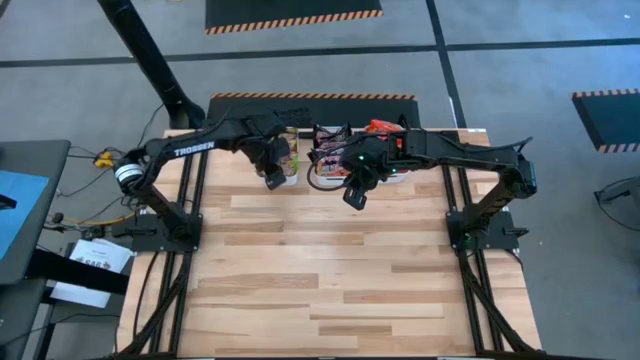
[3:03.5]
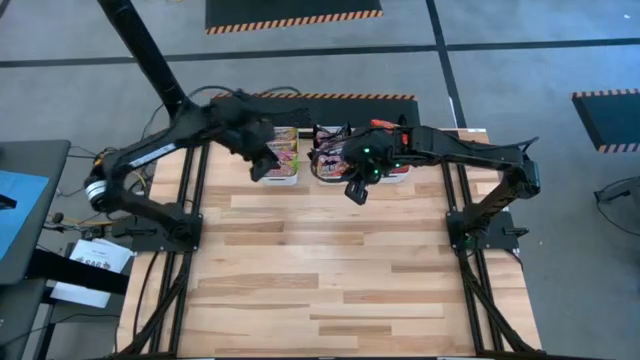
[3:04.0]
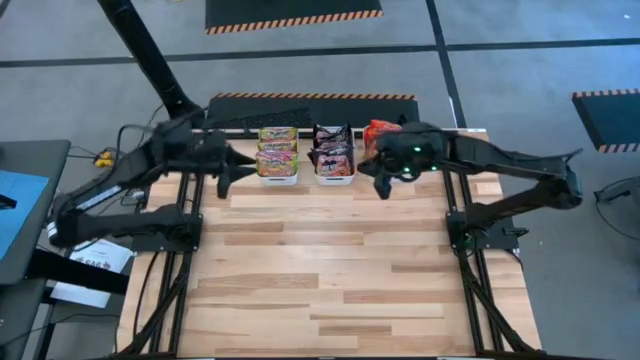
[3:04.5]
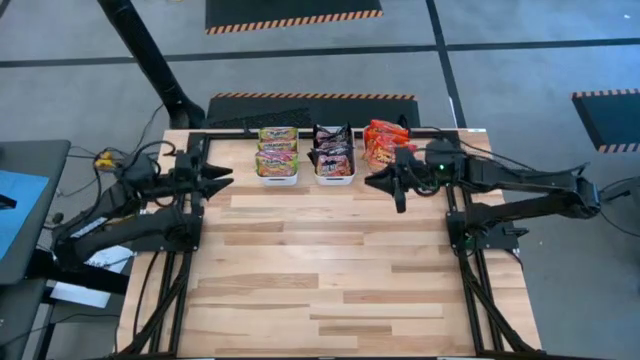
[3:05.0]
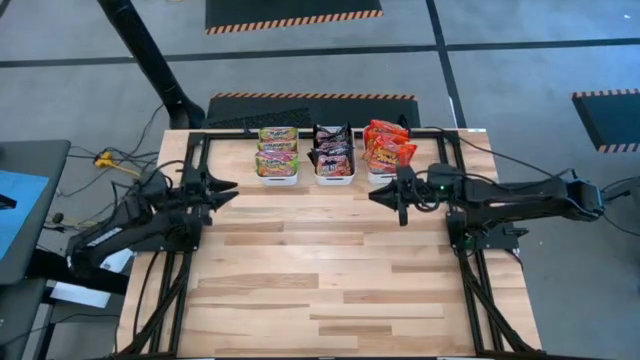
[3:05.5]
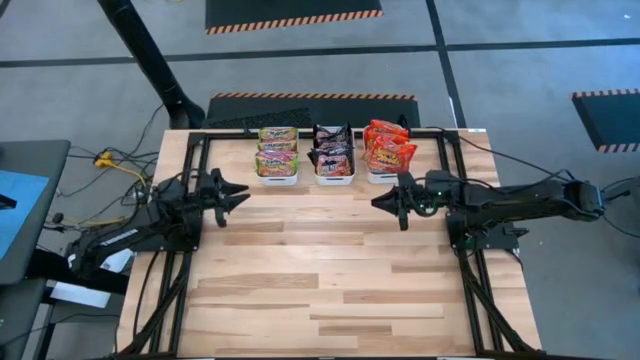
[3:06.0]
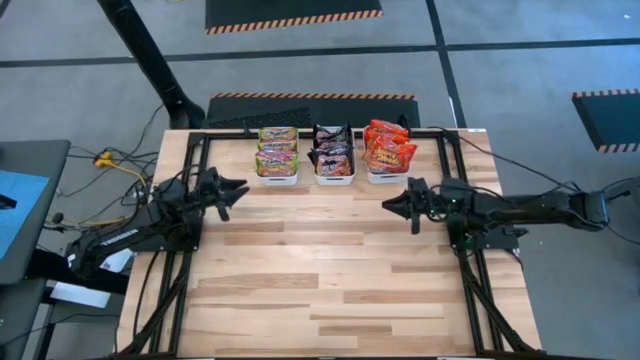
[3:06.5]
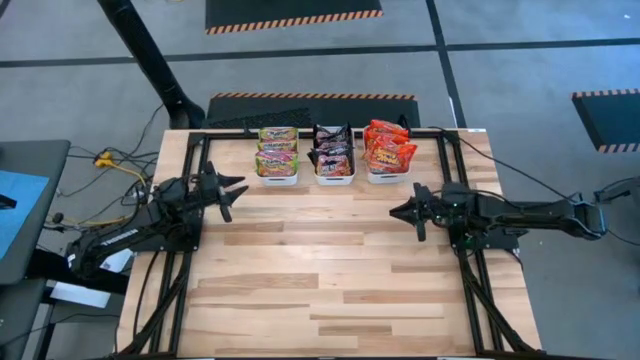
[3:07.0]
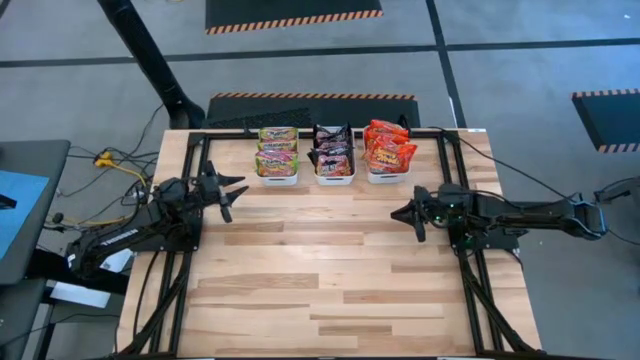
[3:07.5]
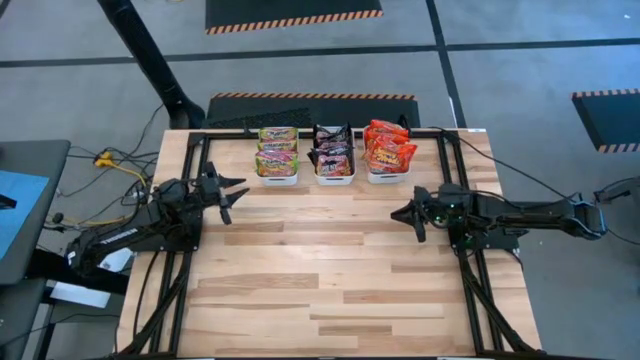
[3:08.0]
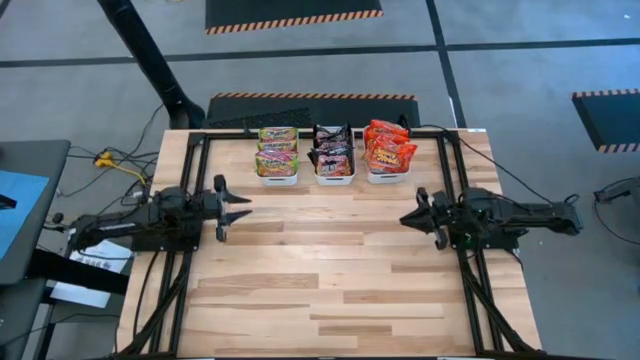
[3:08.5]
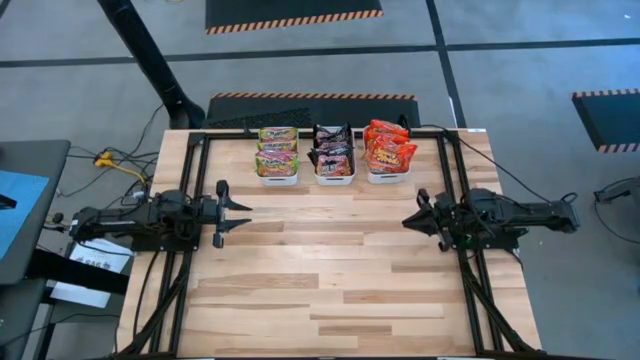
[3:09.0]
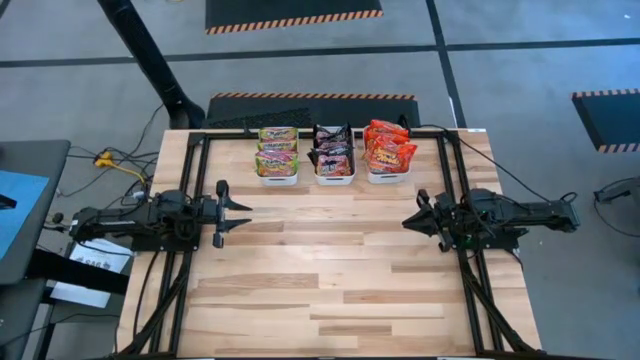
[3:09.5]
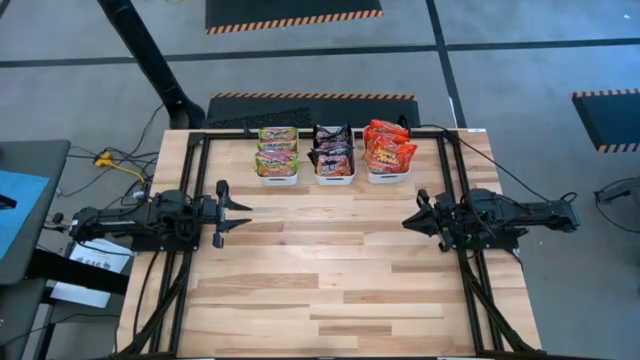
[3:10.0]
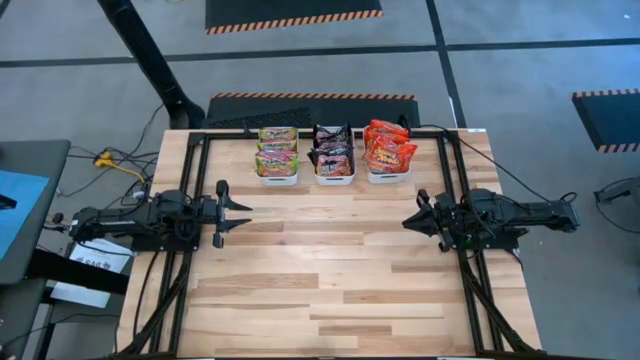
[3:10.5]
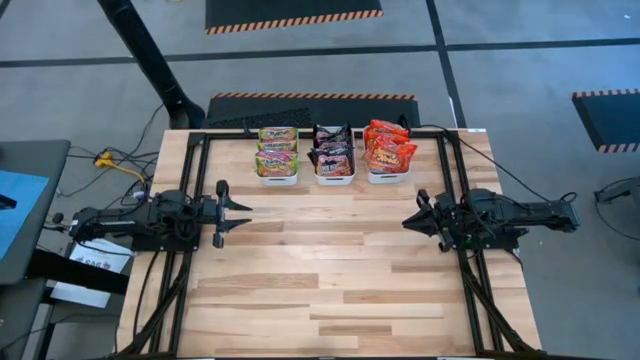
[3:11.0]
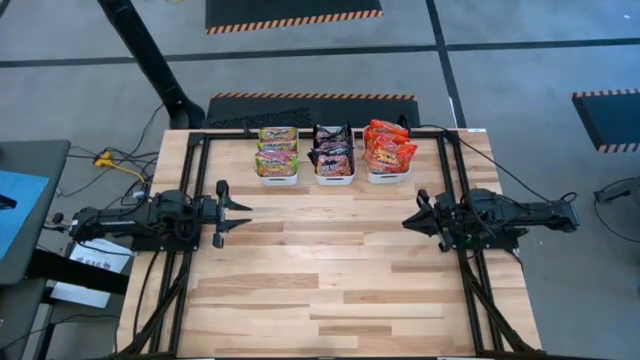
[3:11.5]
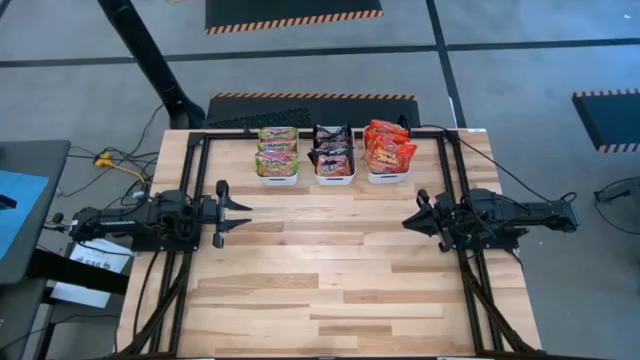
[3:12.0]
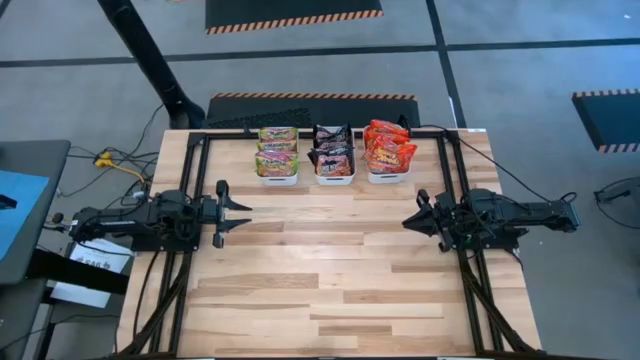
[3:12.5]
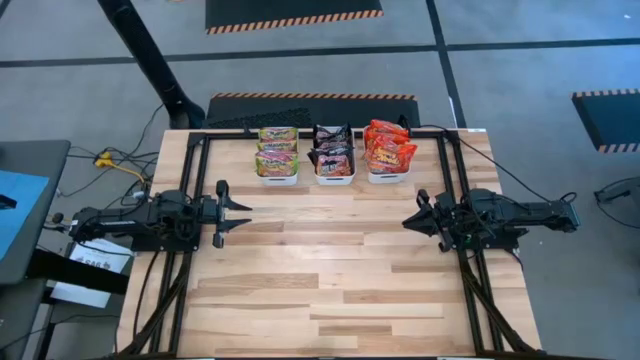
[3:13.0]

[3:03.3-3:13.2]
Task: Sort Maruchan noodles
Return to Home Position
